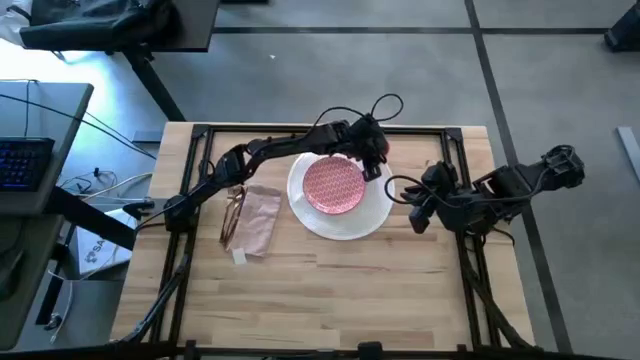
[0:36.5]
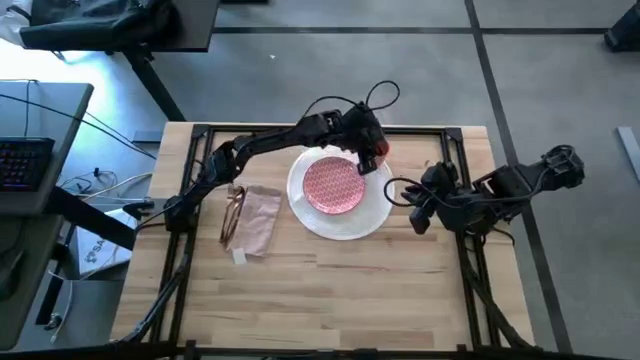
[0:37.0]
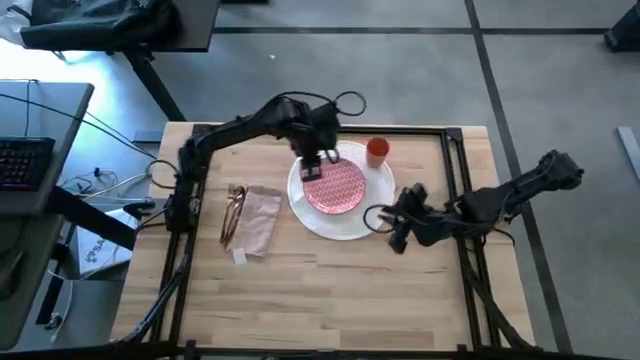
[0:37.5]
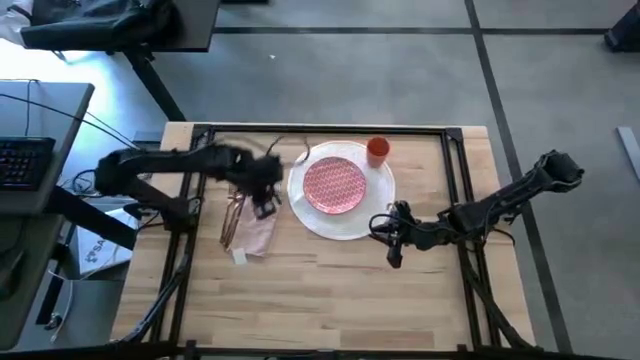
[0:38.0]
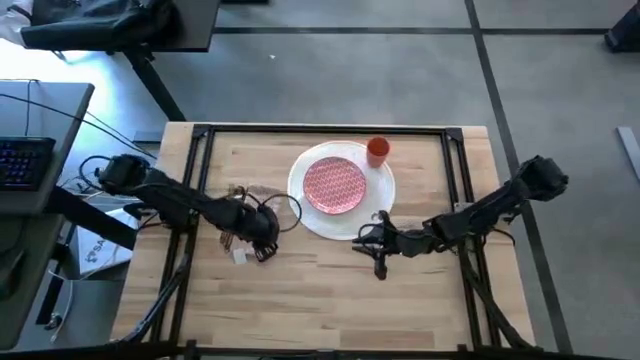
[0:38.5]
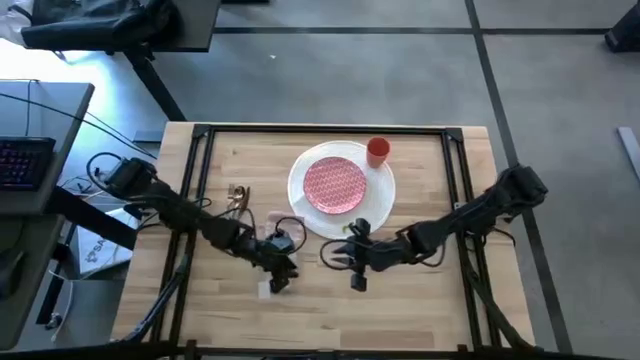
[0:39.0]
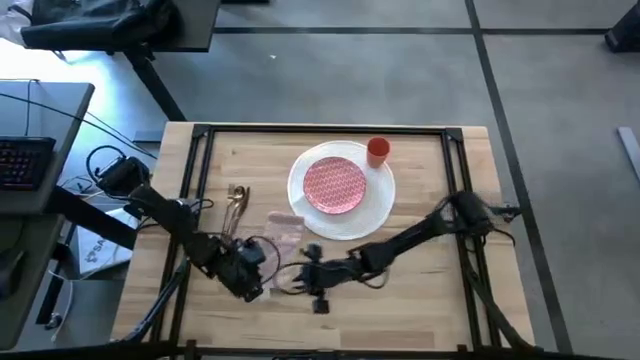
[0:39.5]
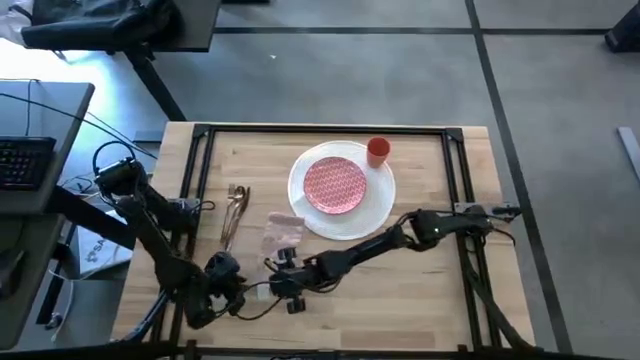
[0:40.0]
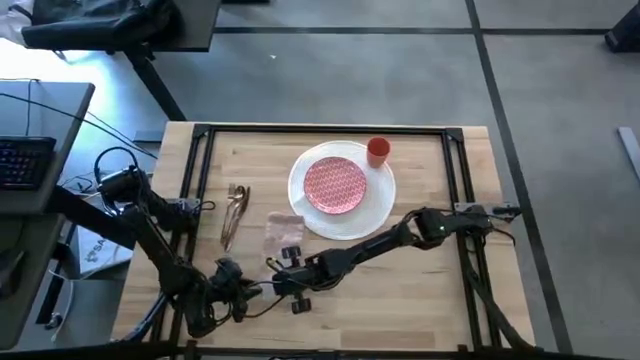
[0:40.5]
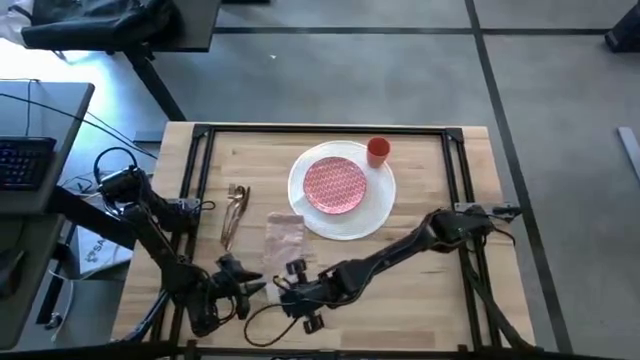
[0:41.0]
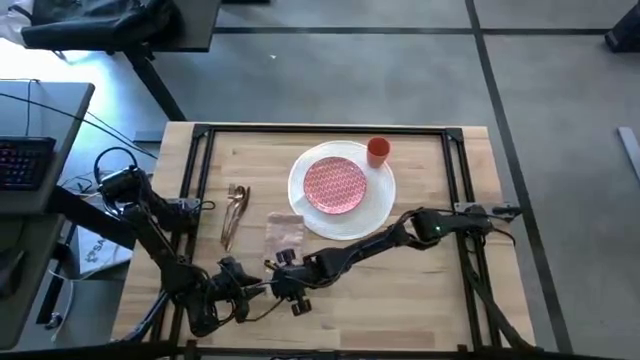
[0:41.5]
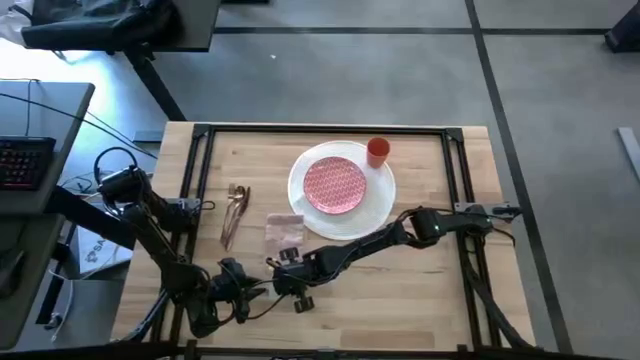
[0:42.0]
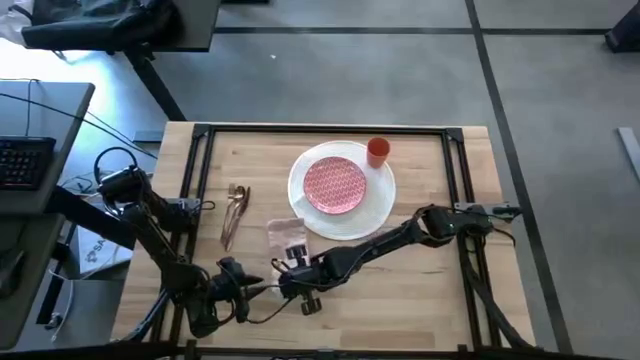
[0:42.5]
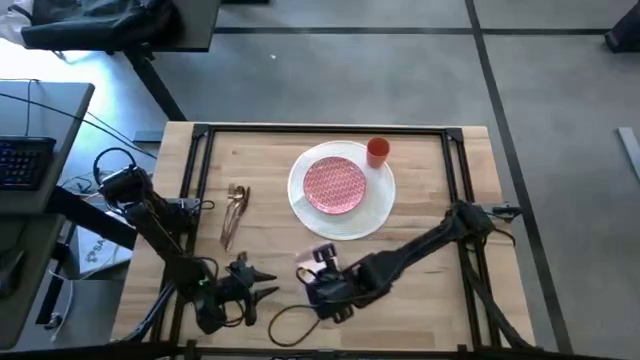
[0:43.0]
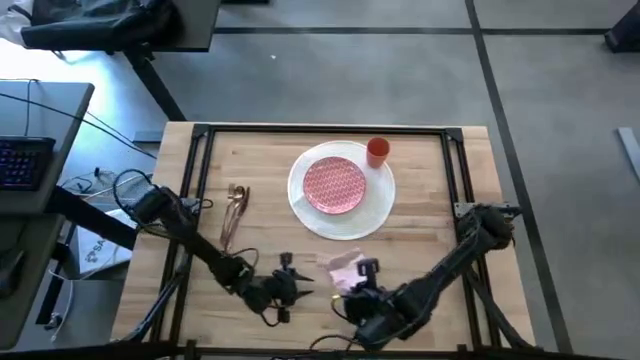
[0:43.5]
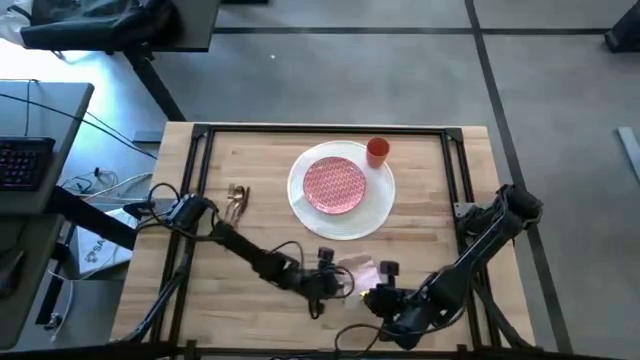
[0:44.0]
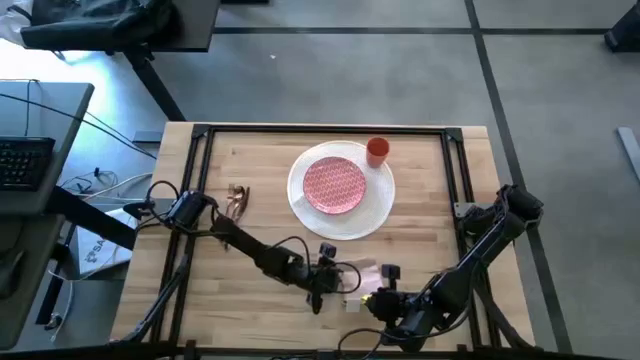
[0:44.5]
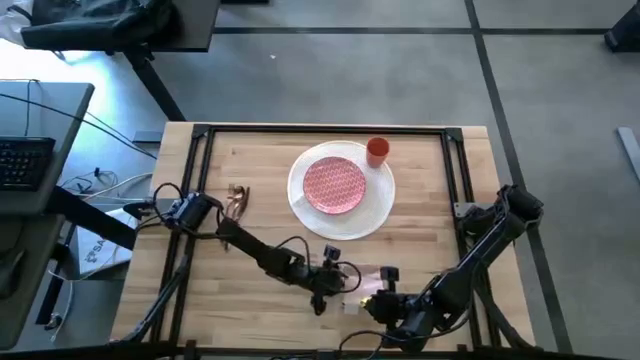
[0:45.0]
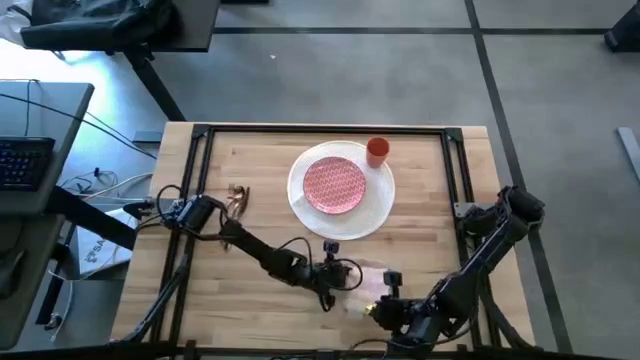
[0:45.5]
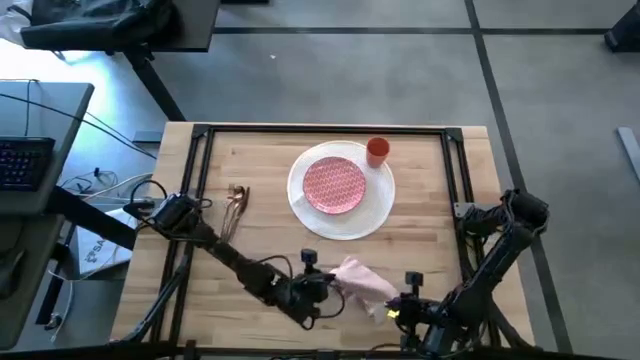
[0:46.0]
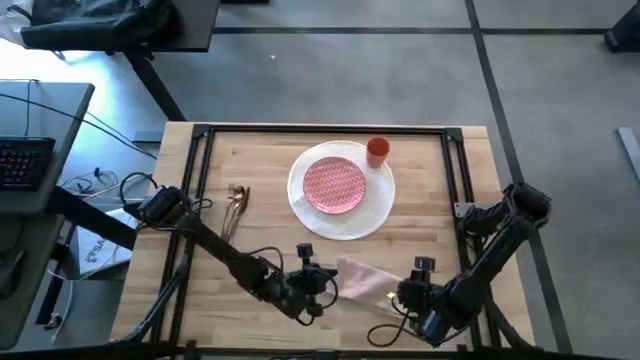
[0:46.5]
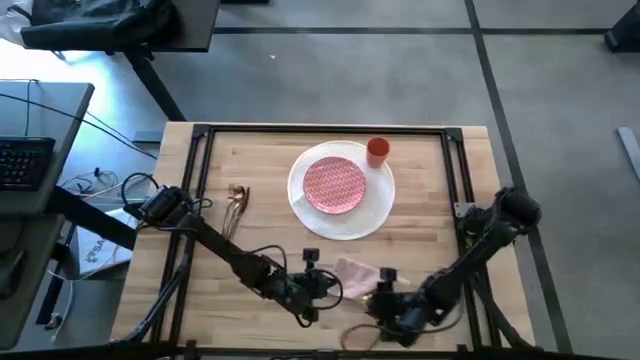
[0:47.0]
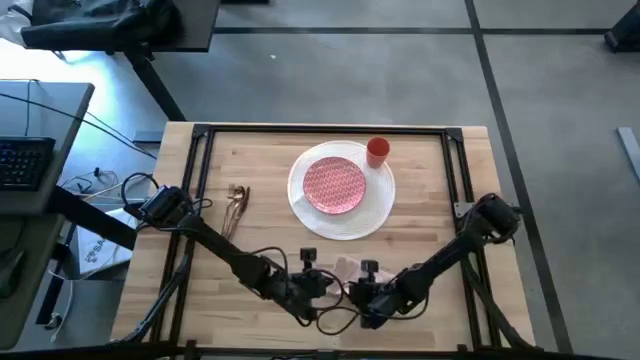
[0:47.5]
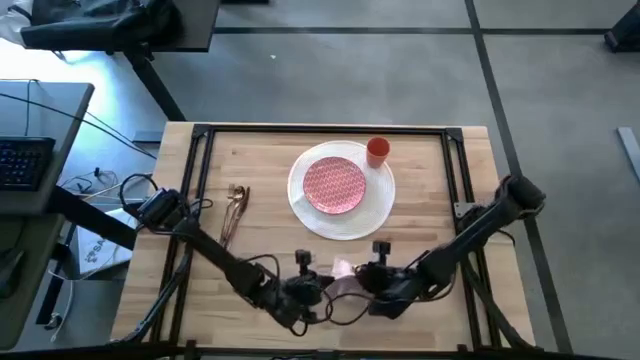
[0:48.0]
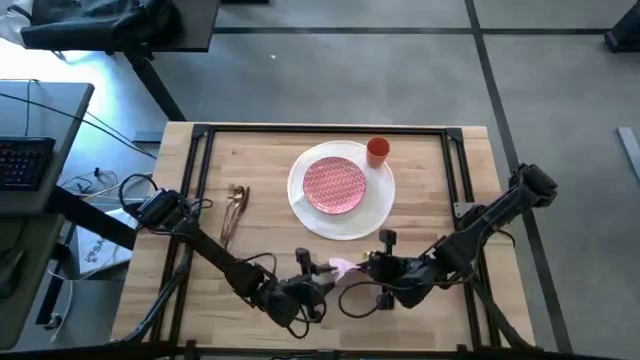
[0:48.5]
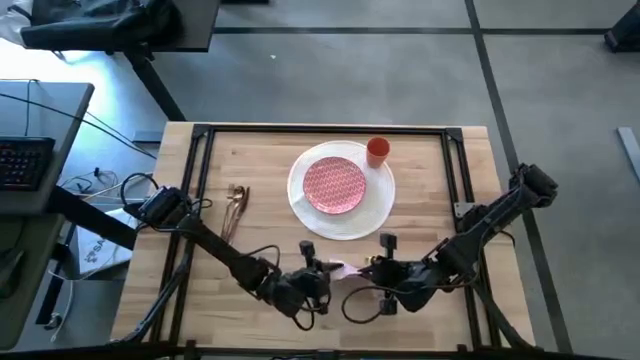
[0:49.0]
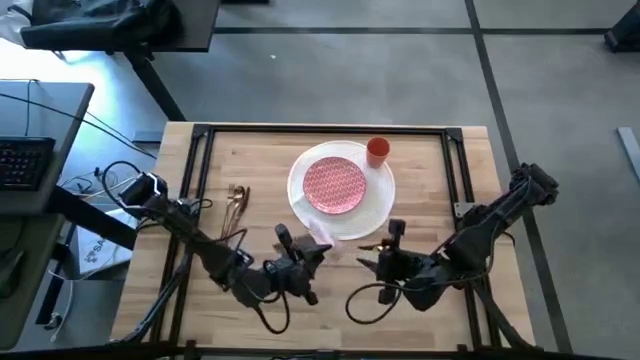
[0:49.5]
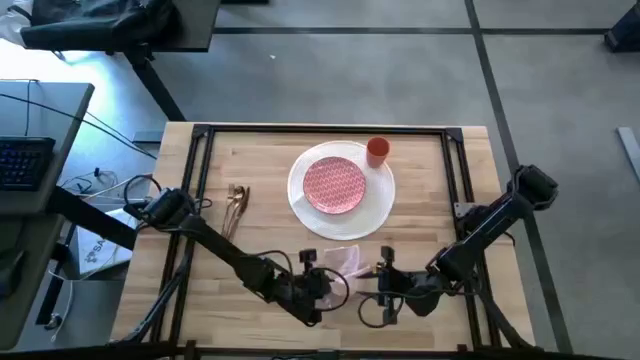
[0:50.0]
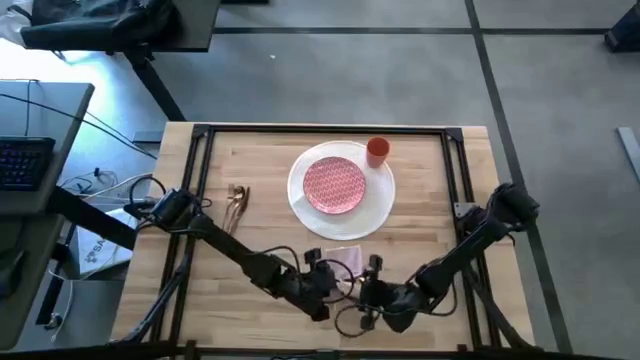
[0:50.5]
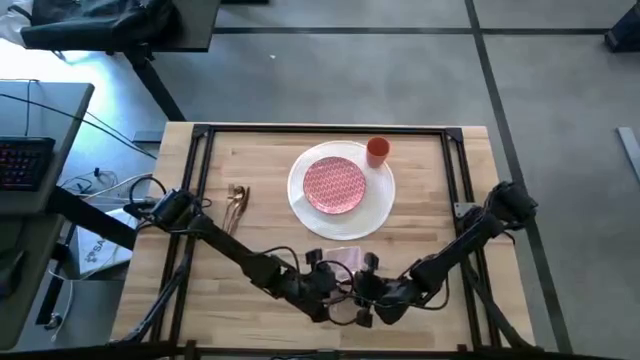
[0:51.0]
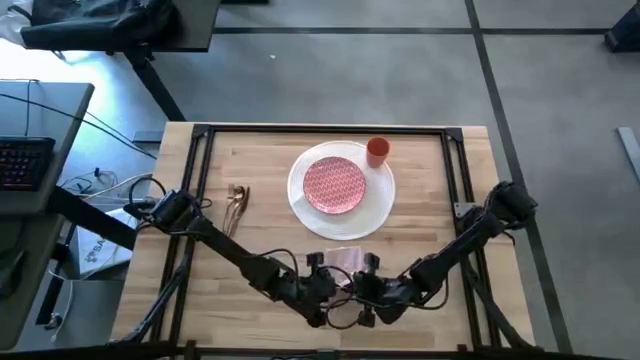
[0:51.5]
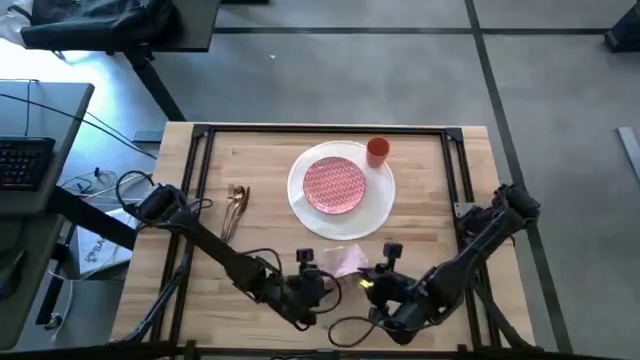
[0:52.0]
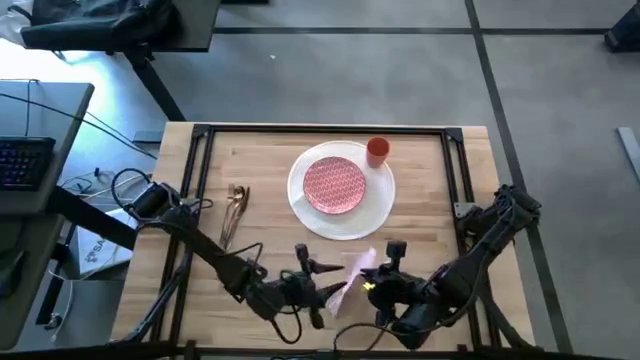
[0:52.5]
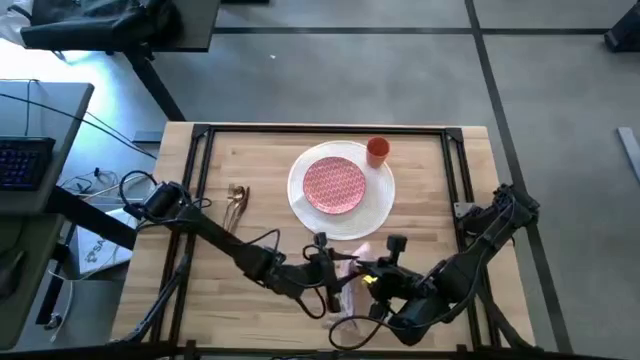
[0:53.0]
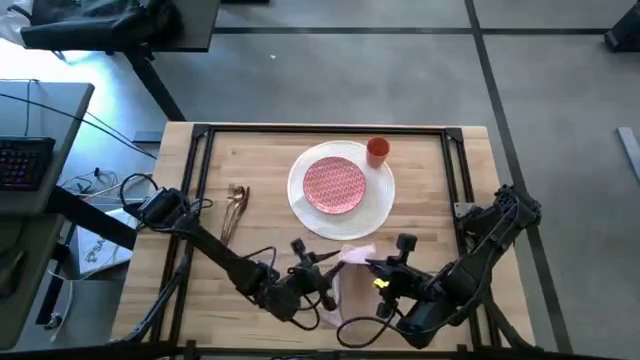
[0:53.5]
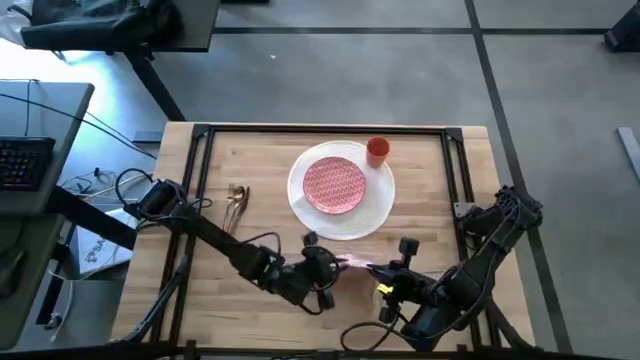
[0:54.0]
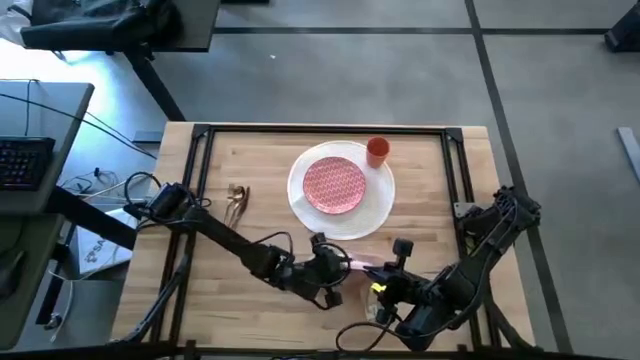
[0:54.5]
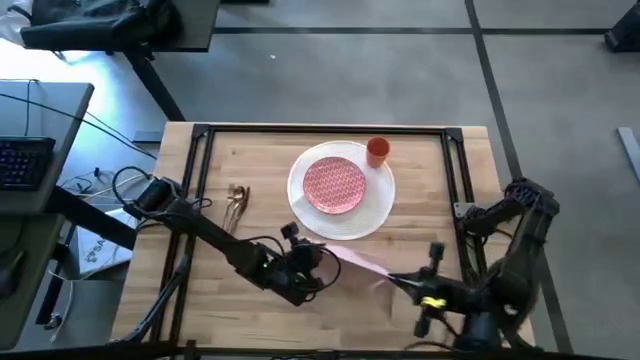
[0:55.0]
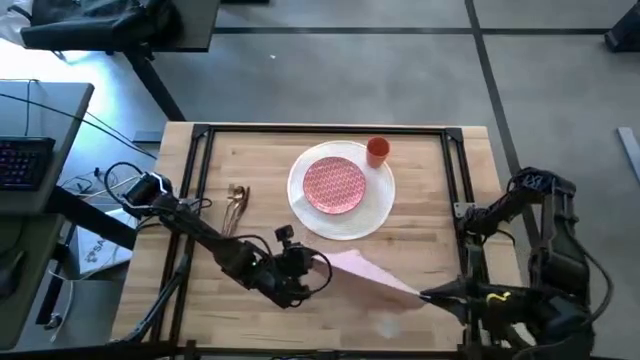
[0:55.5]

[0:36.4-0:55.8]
Task: Set table place
Fold the napkin

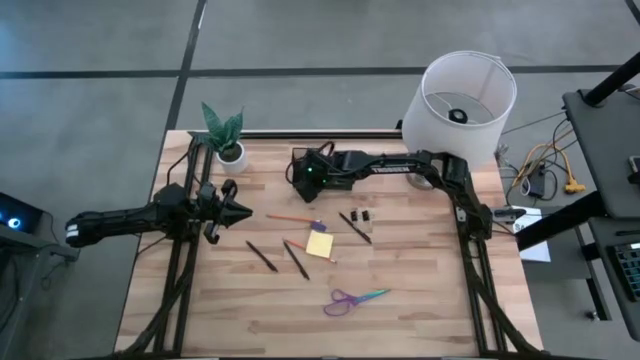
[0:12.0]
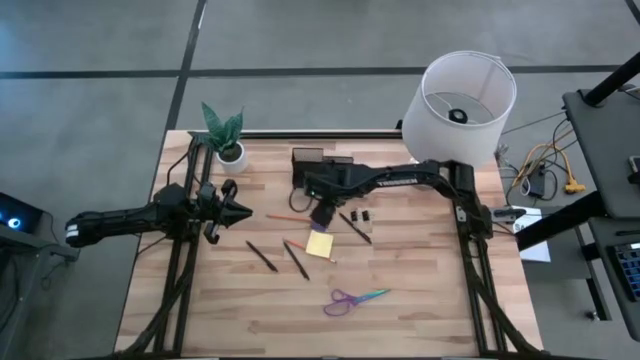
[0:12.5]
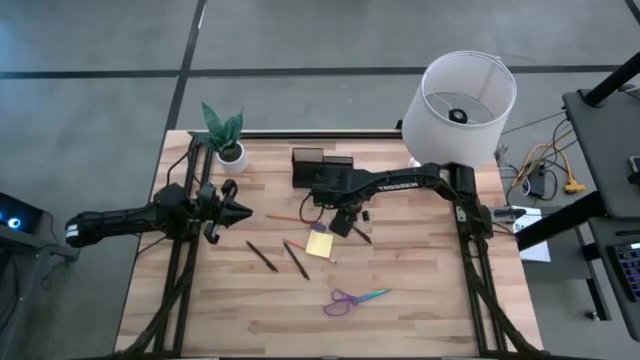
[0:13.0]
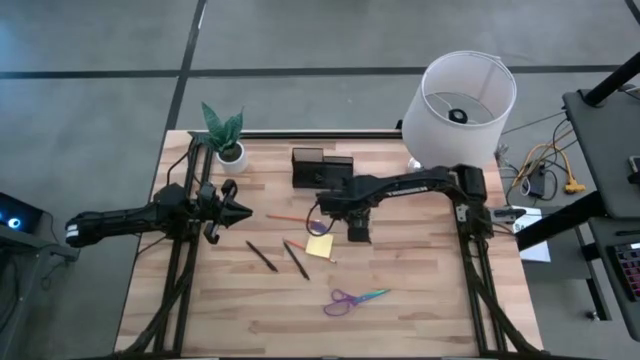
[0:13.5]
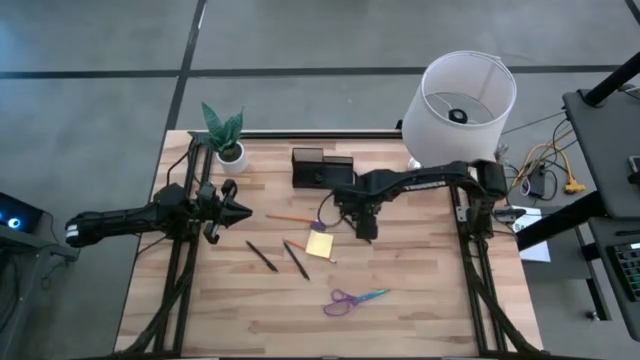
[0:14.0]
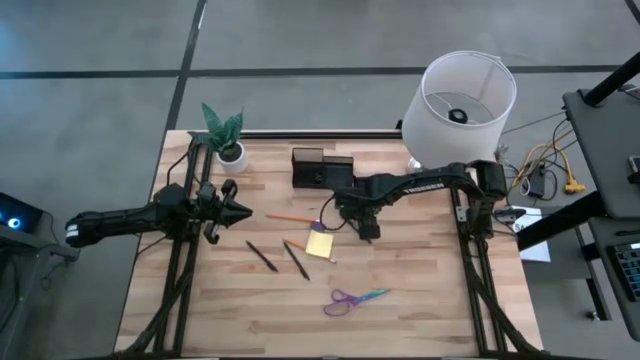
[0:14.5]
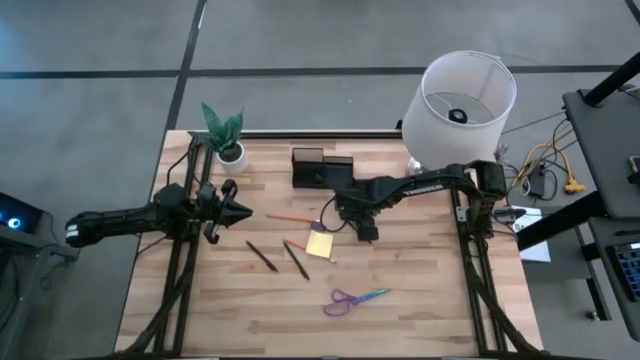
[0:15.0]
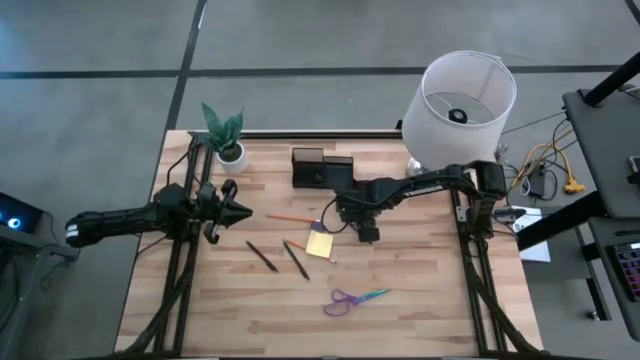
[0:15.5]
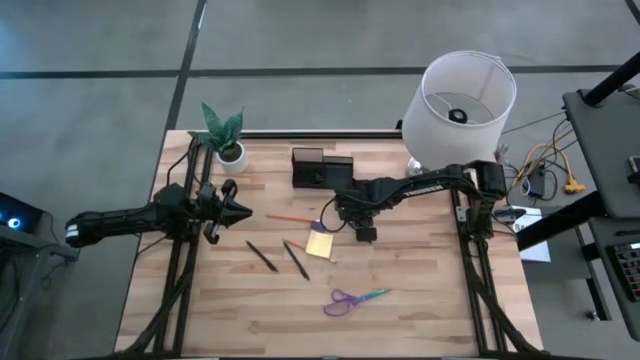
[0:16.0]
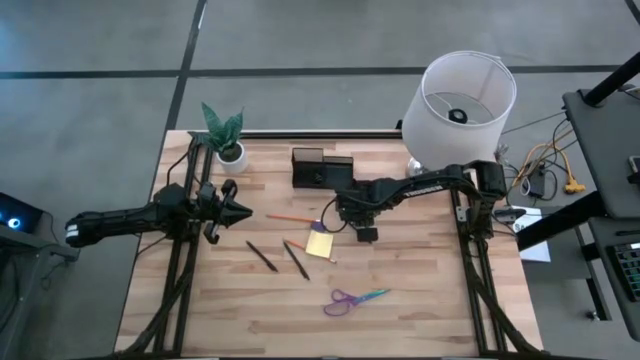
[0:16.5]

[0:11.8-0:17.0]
Task: Pick and place office supplies into organizer
Put the left black binder clip into the black desk organizer
